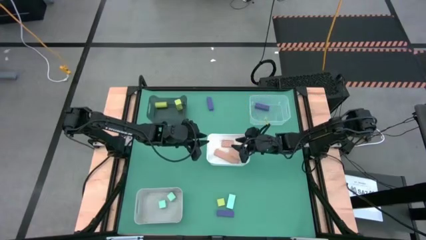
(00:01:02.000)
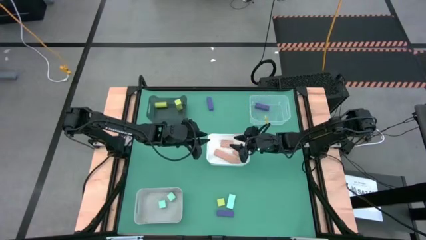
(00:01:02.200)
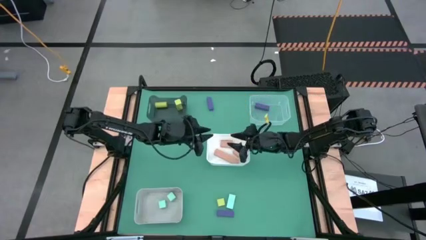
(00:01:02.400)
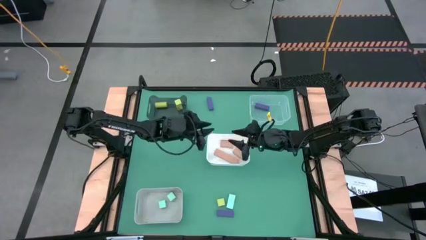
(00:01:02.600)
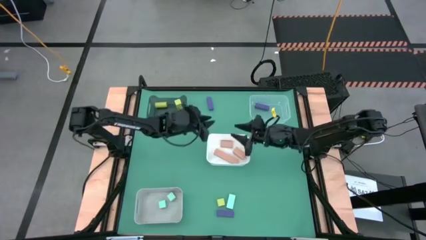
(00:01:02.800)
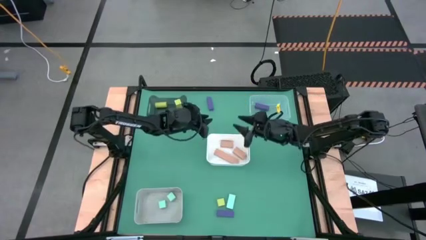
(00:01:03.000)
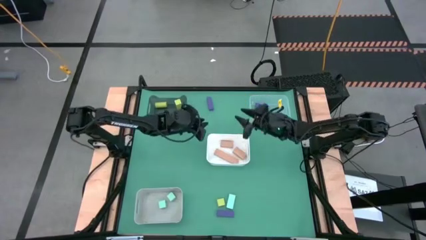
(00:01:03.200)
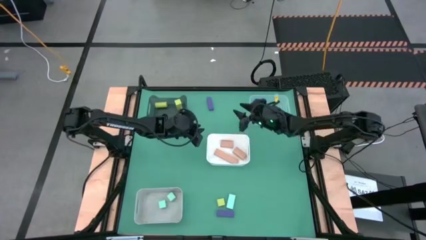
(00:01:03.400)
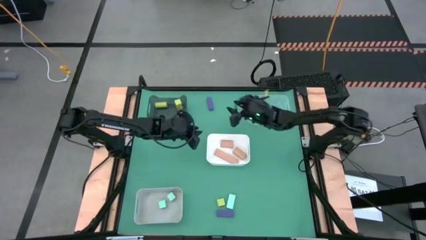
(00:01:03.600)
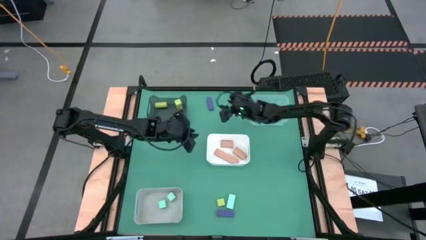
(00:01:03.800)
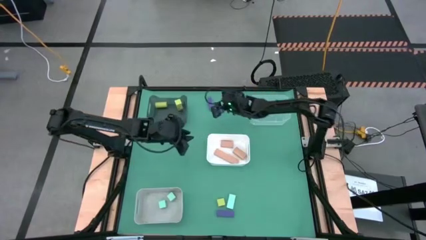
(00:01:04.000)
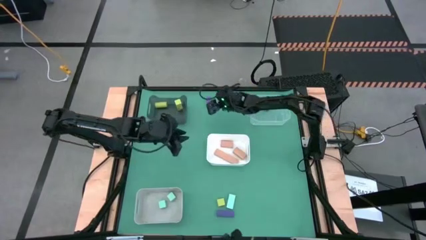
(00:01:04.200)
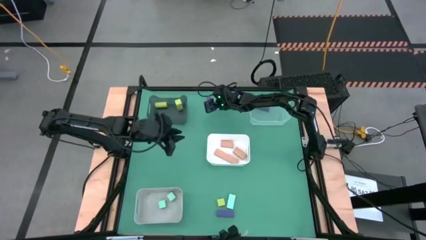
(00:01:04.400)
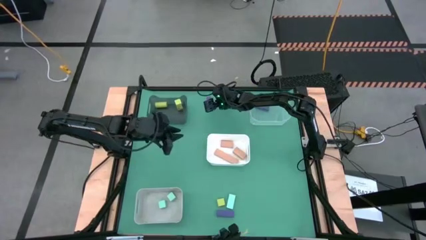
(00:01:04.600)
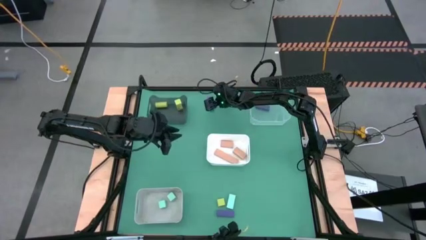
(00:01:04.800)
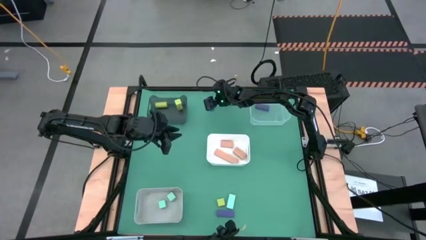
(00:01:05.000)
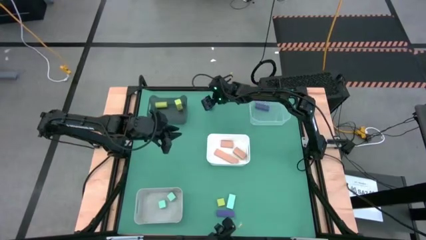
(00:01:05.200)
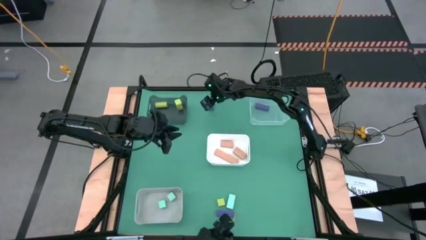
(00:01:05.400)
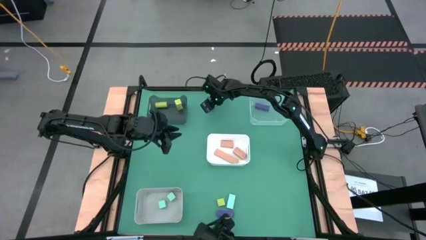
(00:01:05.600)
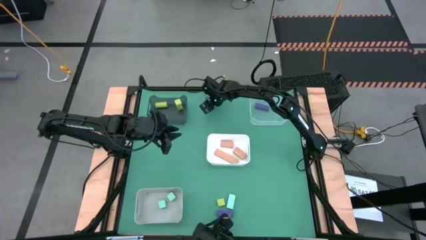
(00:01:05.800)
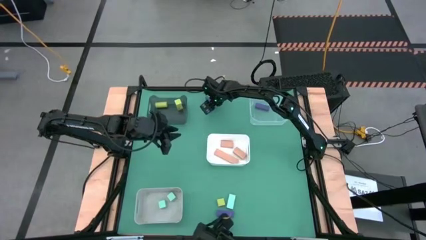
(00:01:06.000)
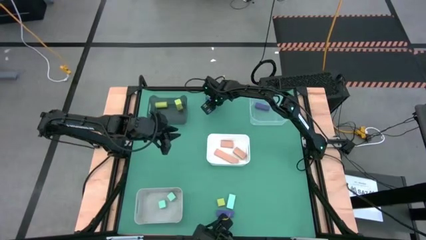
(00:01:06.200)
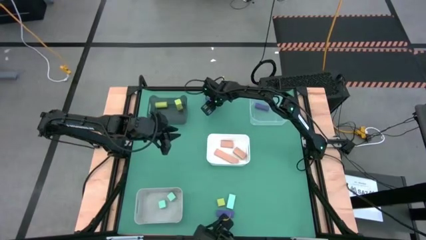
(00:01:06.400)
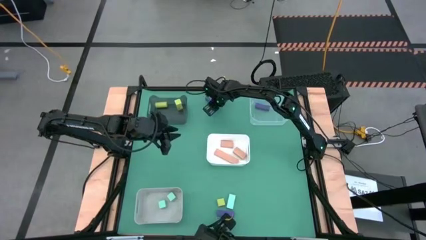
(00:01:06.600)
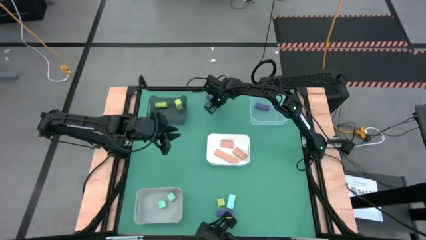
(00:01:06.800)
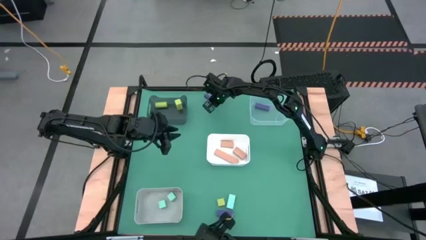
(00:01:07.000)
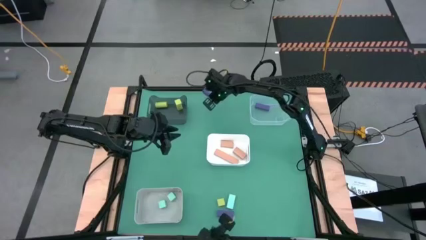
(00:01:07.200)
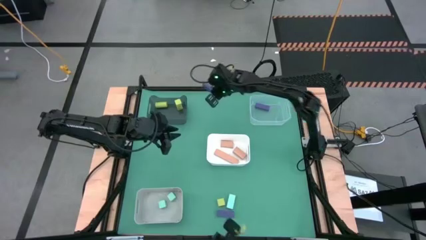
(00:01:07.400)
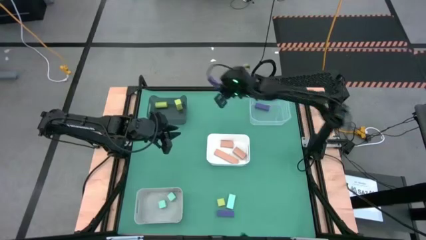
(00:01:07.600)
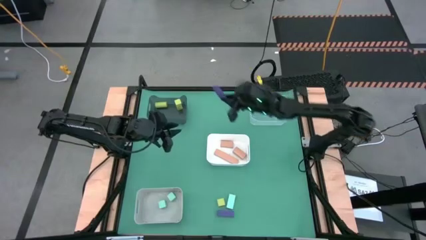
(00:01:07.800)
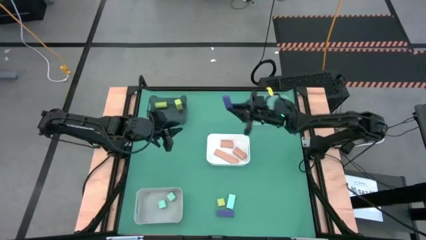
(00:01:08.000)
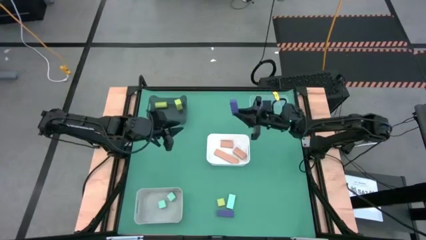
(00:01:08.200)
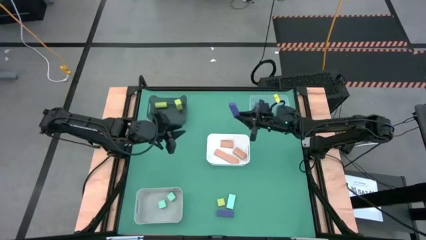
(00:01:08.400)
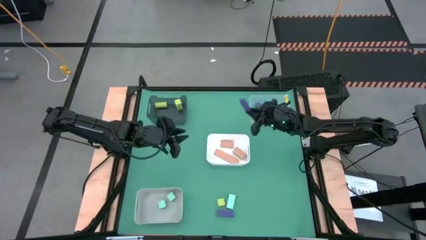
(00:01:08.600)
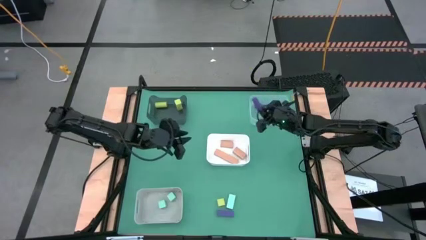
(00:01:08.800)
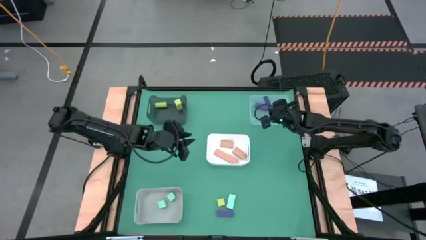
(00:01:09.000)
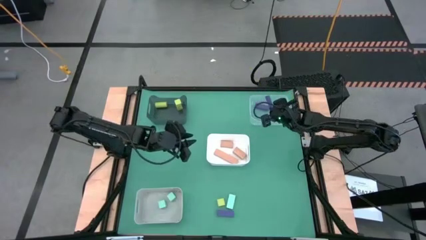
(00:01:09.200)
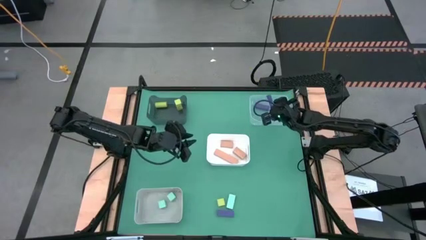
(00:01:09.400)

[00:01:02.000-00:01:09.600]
Task: Sort & place blocks by color
Put the top purple block into the transparent bin

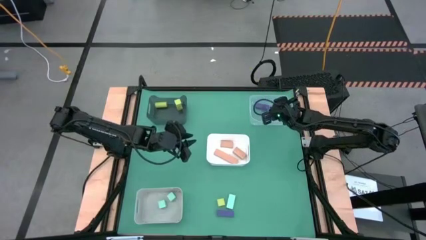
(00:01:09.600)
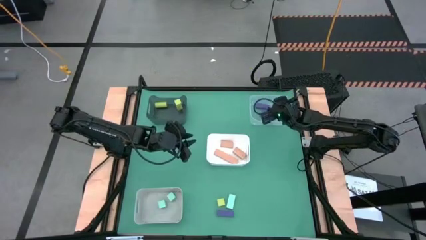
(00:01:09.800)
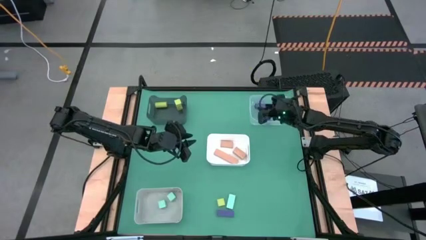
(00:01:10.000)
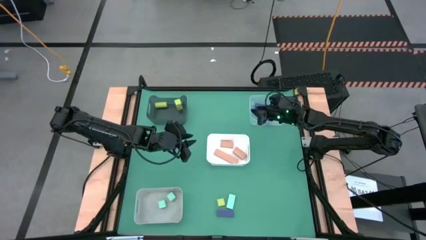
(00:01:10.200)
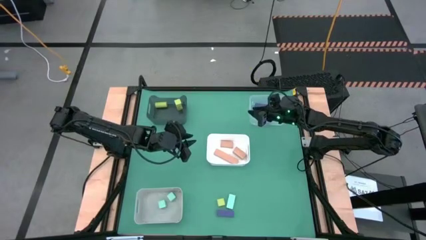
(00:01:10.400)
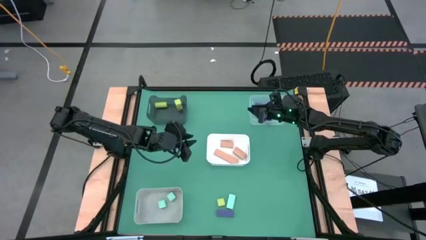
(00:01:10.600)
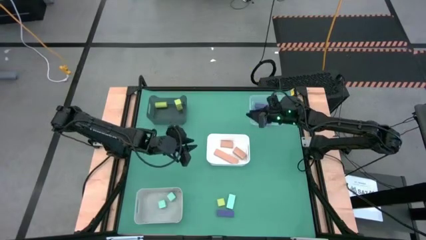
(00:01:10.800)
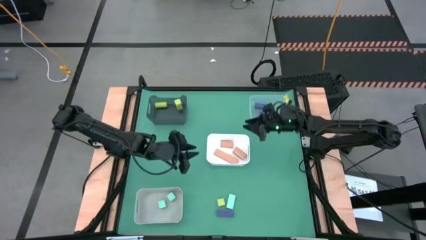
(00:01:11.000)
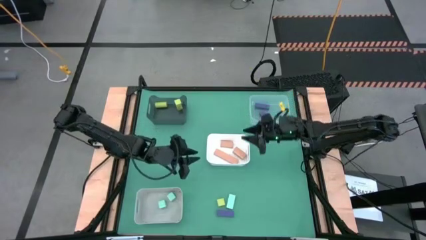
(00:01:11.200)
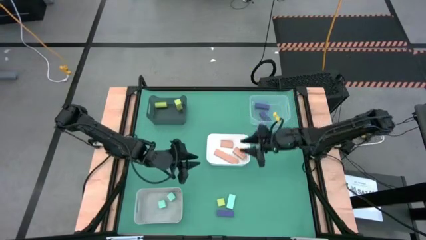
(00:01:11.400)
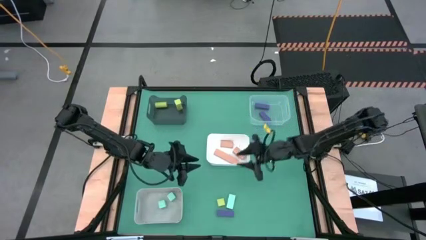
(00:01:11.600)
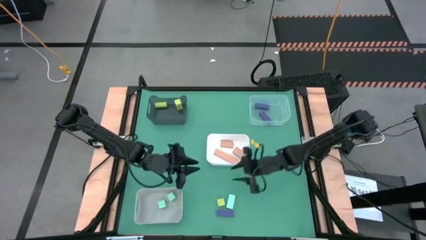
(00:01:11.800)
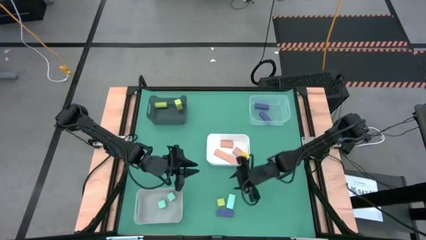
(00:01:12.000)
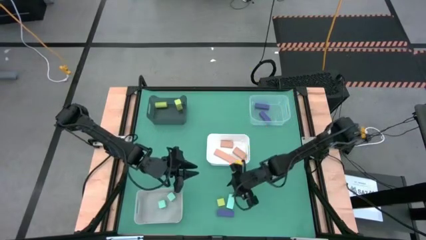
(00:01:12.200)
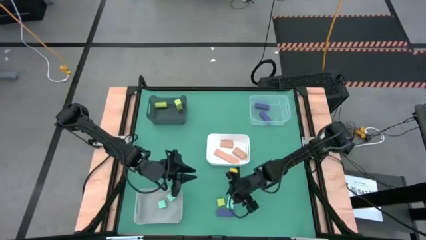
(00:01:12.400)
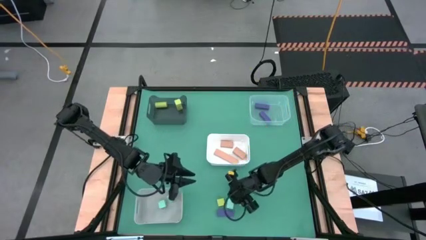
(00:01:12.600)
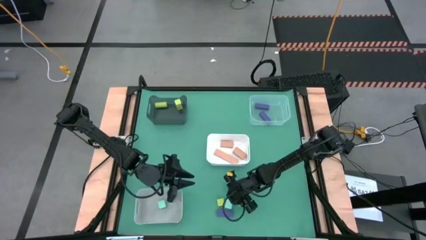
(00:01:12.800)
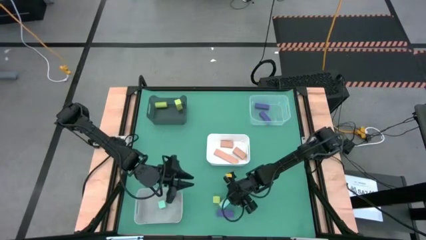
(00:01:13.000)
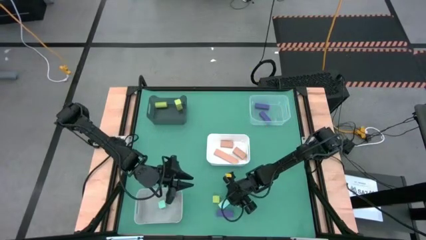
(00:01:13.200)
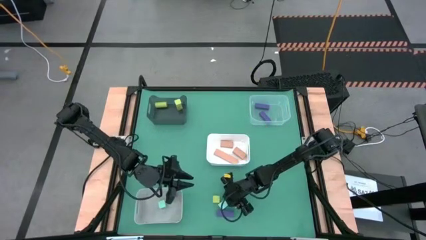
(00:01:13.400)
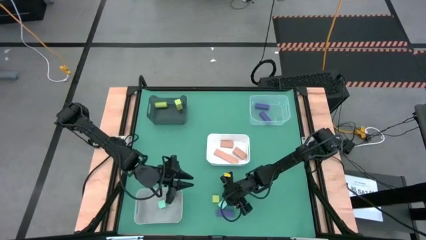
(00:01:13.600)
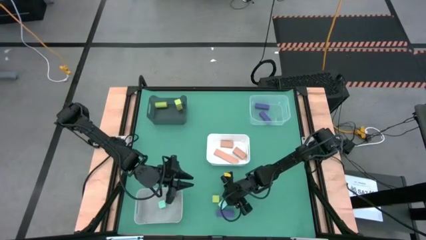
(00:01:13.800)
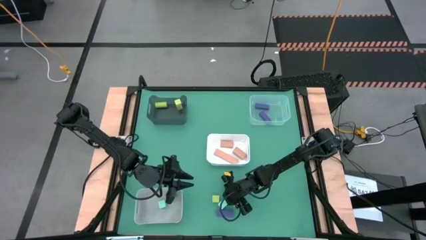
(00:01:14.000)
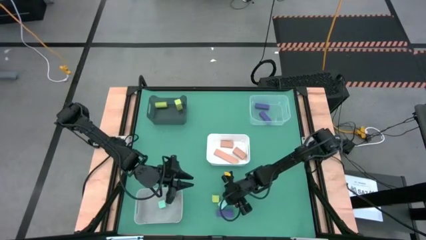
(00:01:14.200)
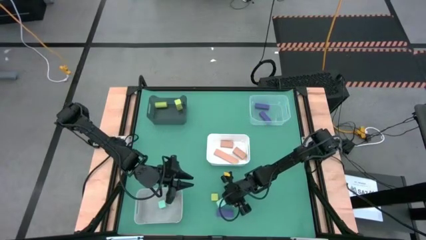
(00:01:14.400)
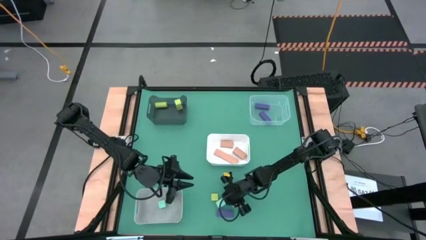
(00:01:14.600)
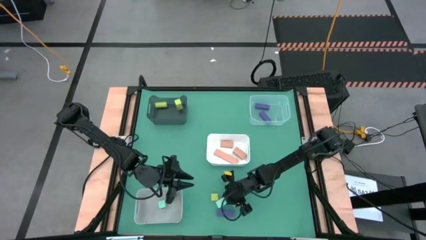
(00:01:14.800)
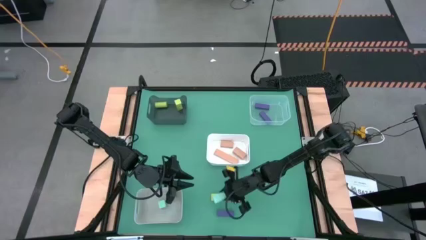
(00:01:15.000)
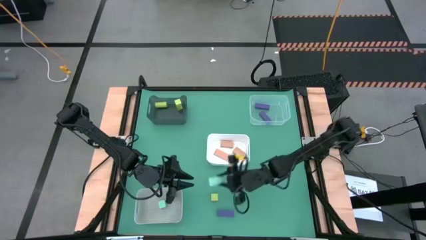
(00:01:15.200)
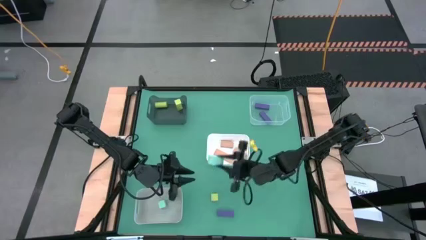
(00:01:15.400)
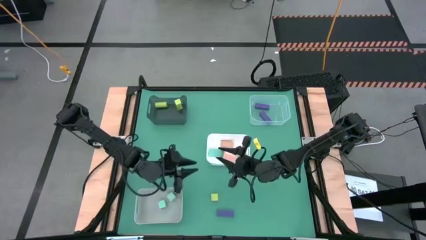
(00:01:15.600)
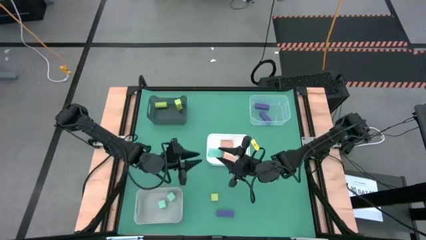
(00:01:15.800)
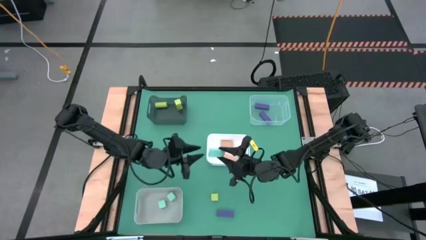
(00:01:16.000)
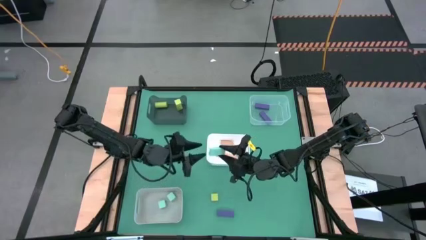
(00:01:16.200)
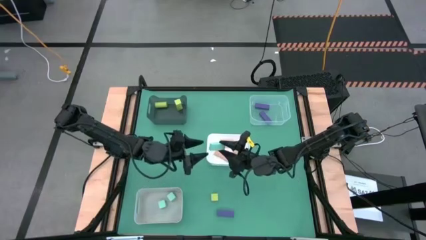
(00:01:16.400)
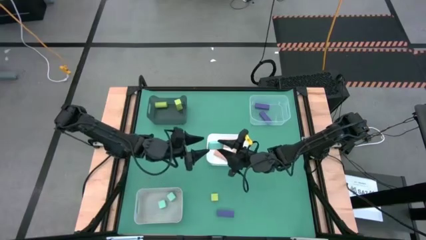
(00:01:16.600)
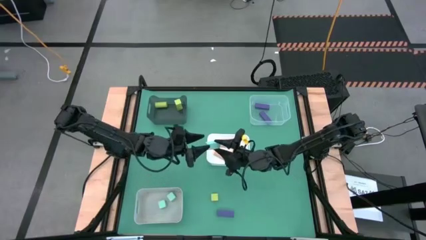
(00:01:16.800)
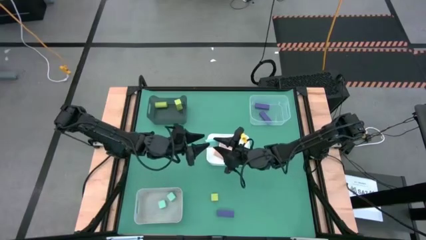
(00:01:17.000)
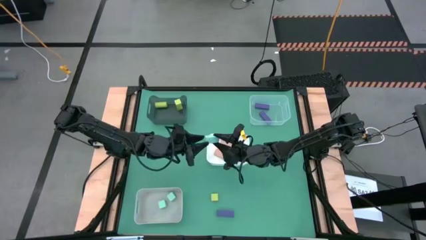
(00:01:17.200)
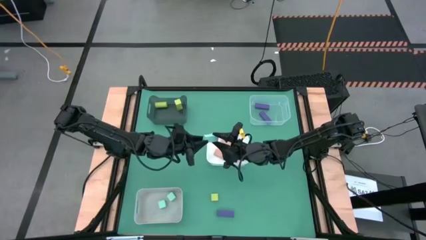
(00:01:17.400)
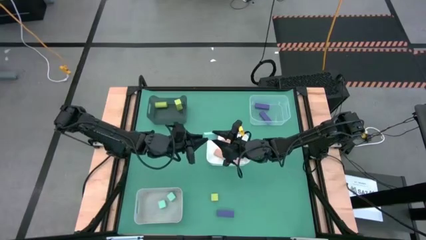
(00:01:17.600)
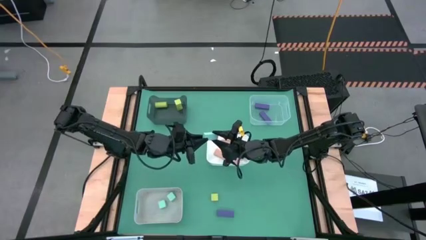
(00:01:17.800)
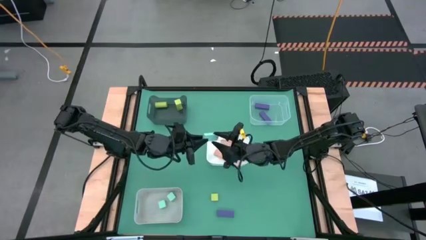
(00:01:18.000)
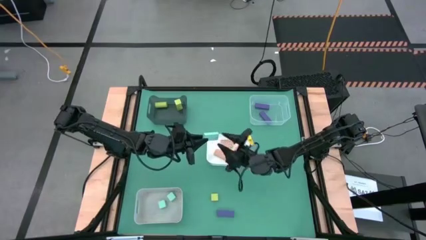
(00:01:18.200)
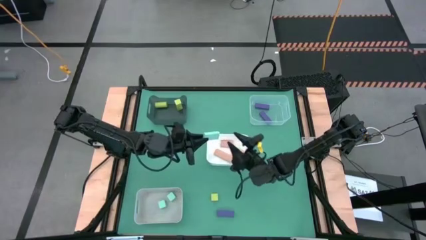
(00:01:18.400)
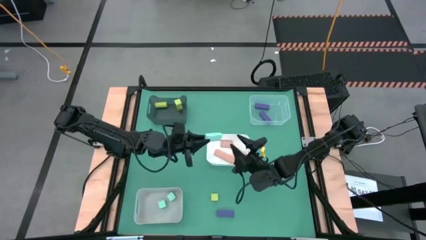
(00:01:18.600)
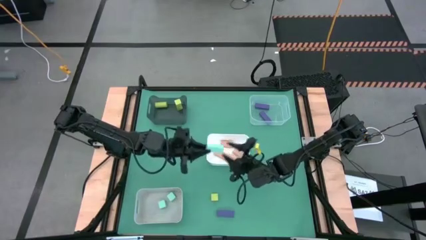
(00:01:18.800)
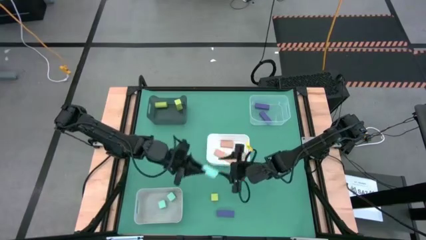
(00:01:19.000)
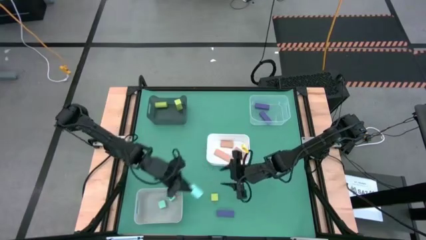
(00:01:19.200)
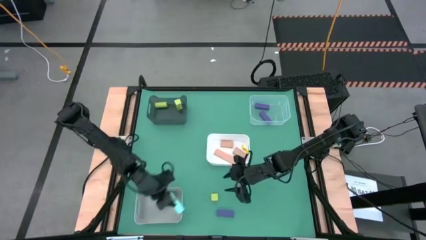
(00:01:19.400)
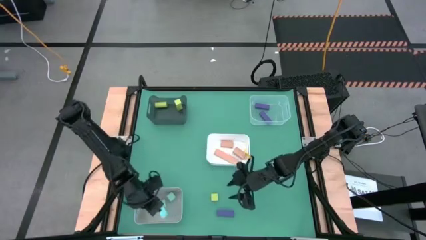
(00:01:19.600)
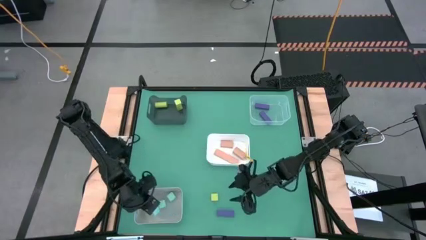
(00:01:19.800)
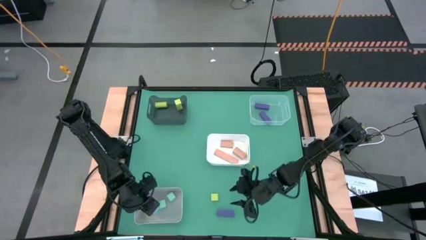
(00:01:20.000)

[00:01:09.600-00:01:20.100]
Put the blue block into the gray bin
